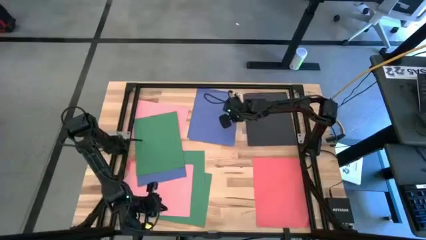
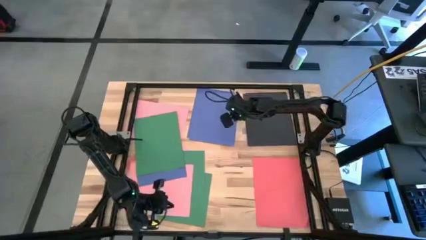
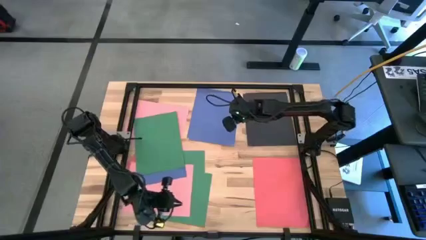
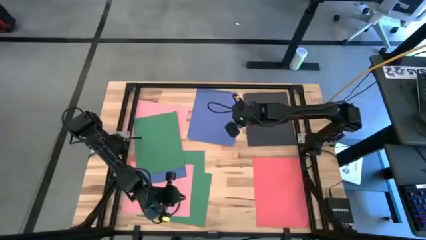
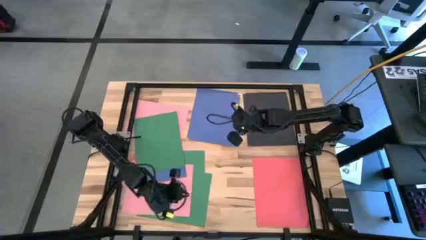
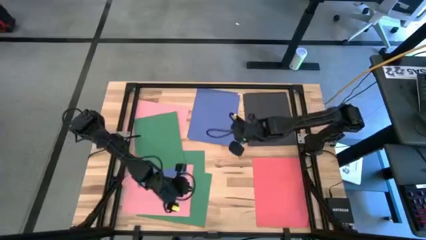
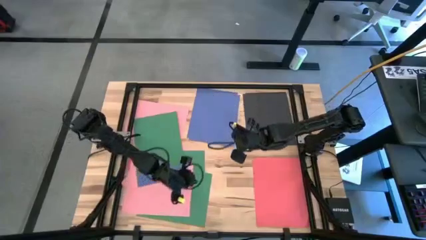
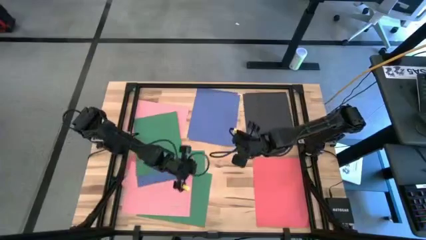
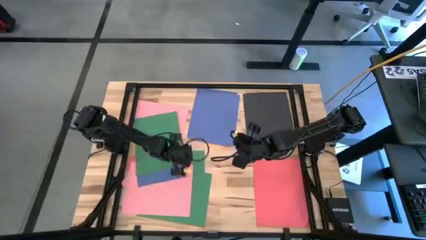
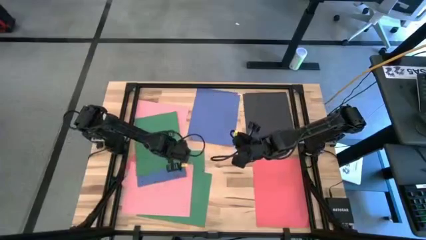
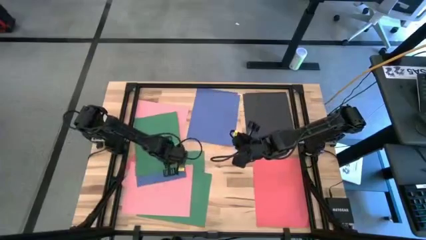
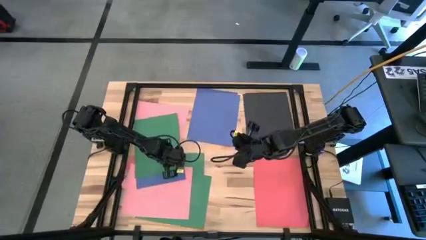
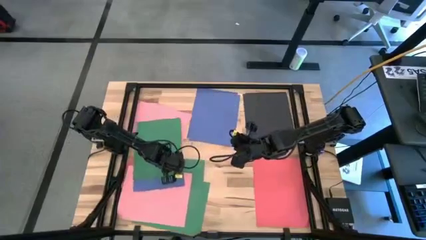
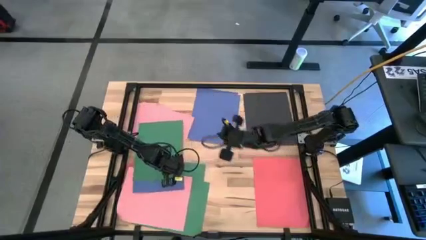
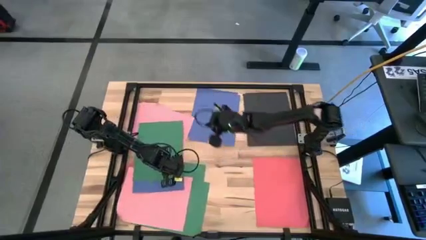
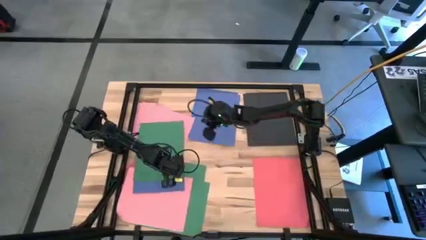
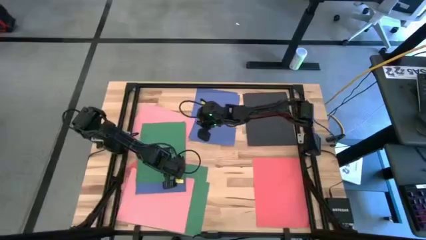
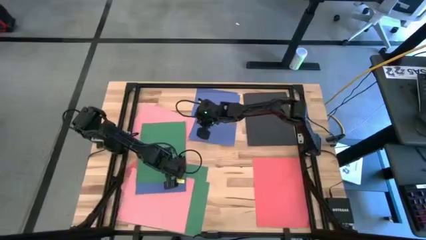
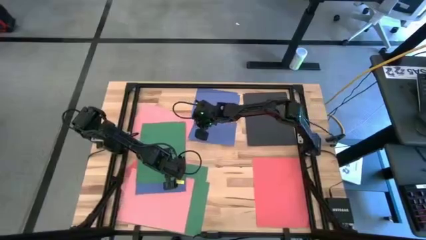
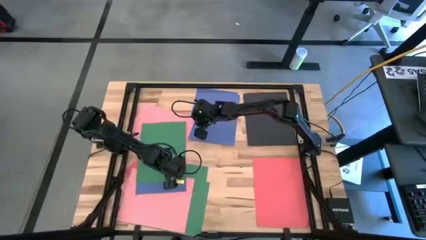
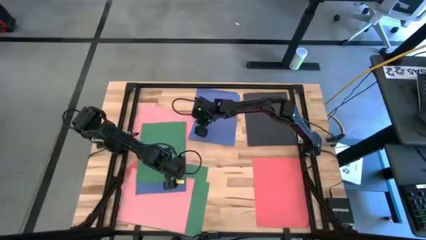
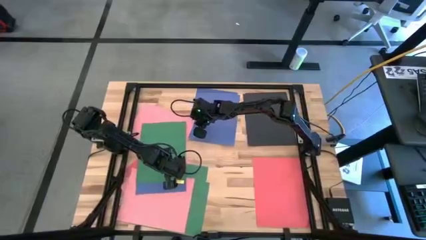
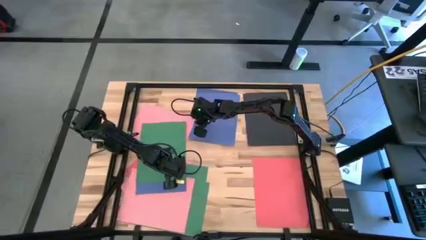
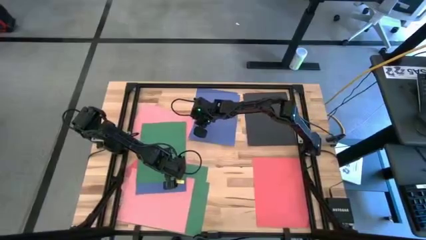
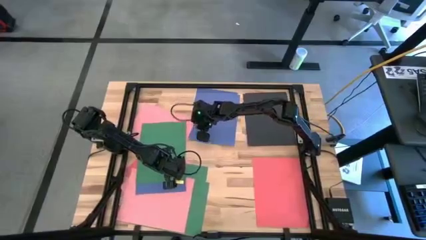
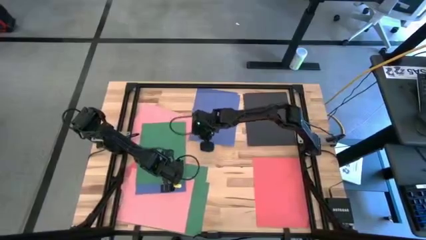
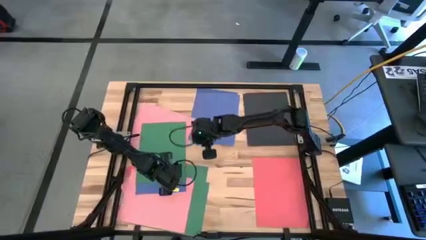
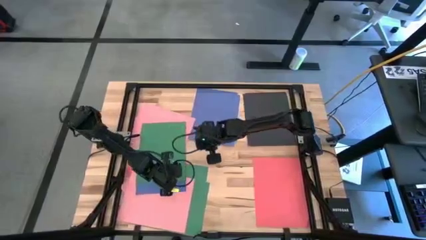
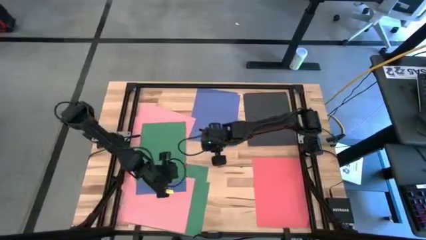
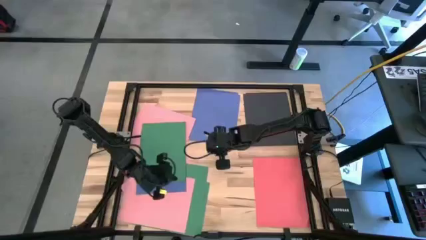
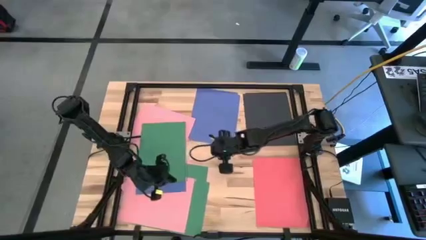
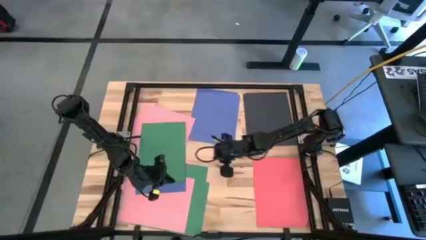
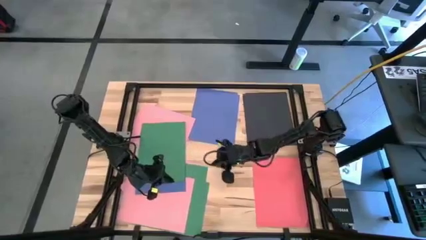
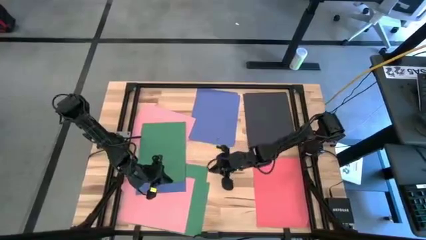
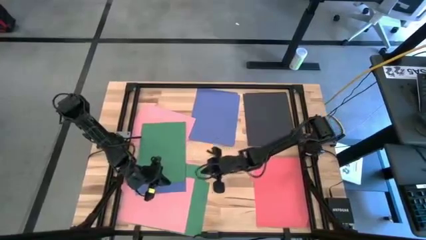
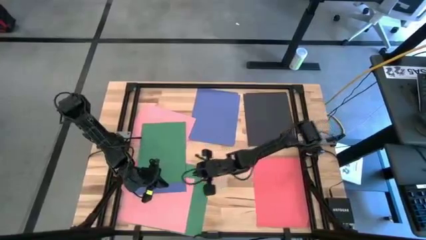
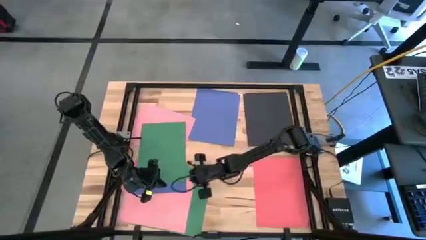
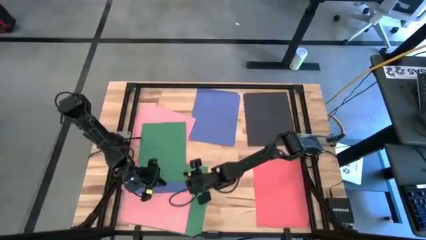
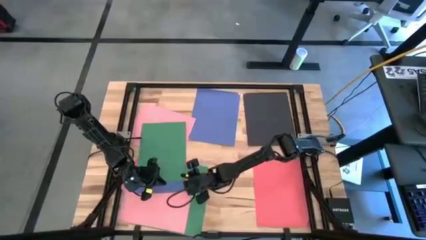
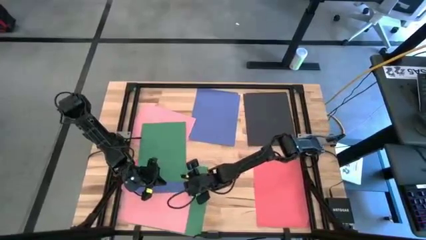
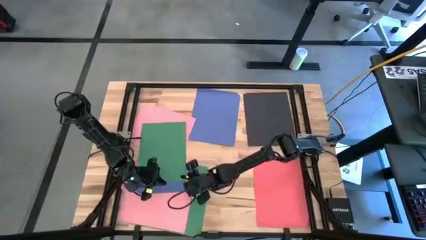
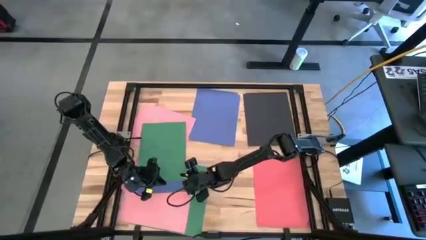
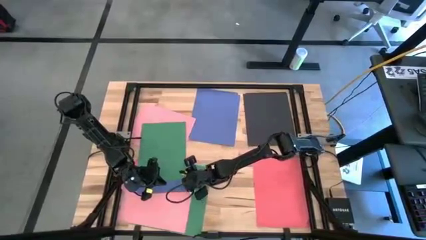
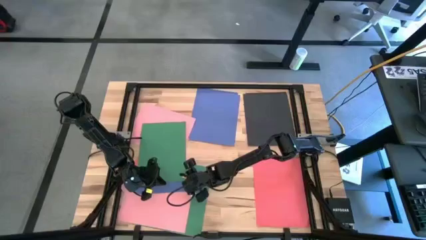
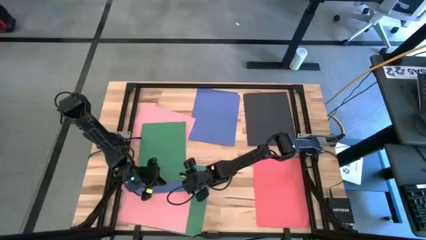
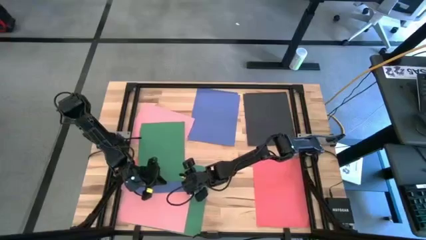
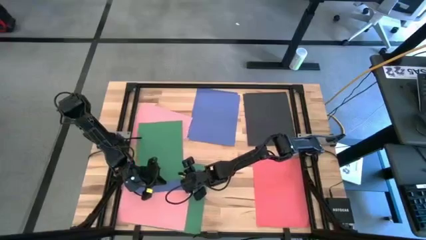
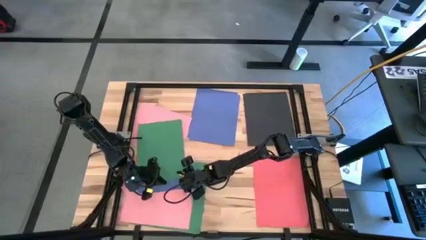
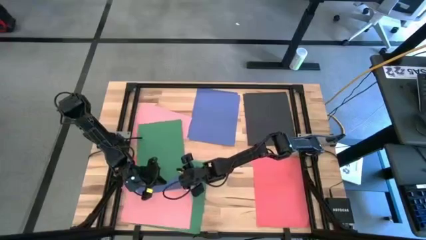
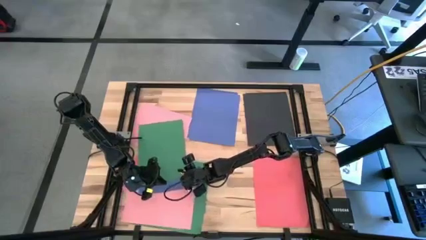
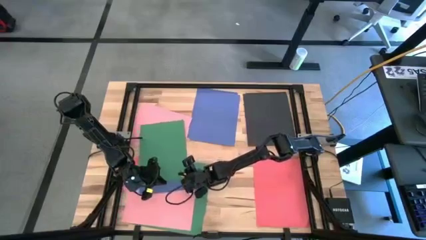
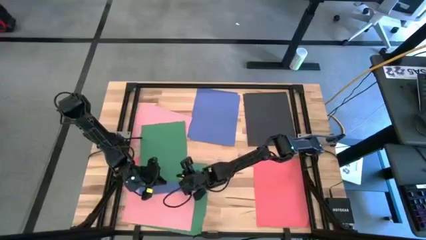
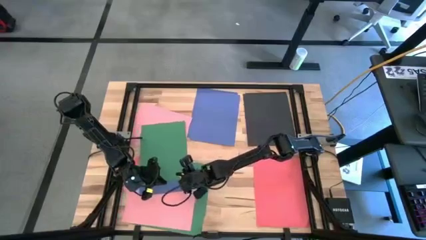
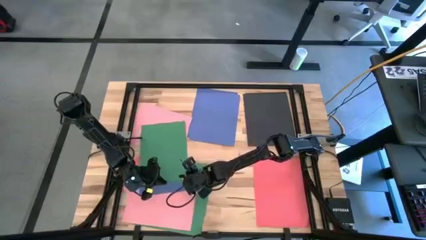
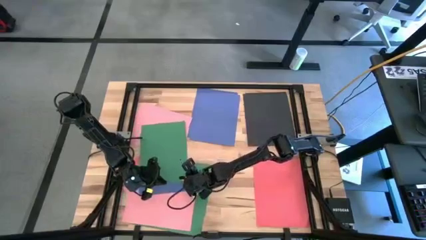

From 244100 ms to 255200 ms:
Task: Organize paper
Stack the blue paper on top of the other blue papers on the table

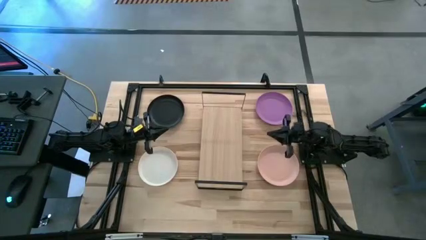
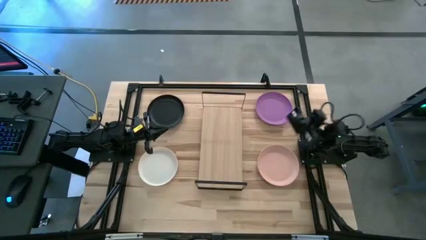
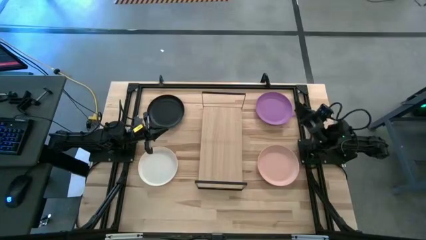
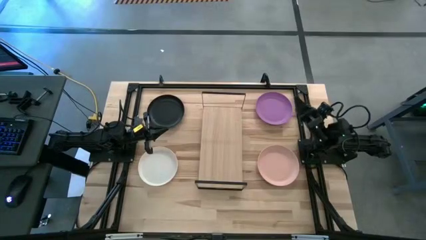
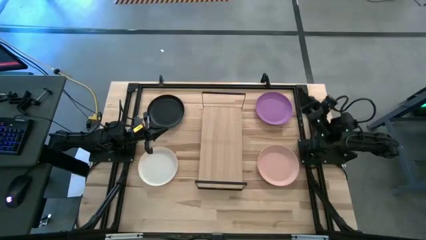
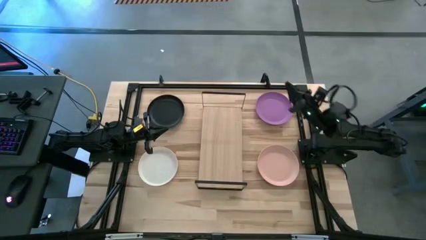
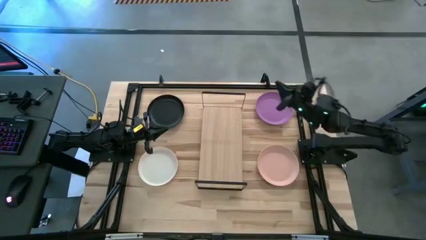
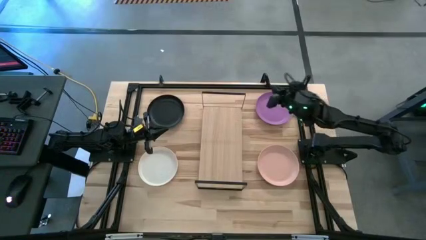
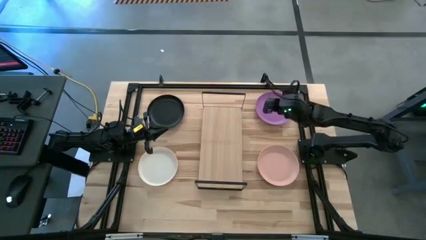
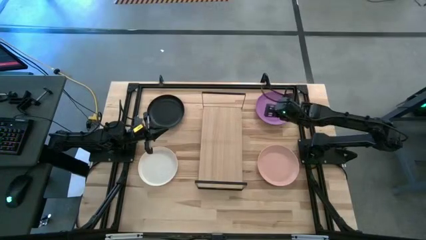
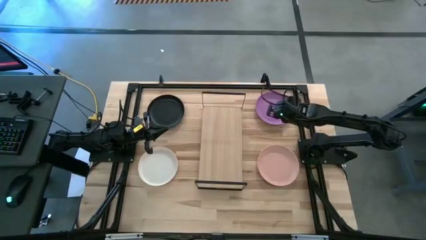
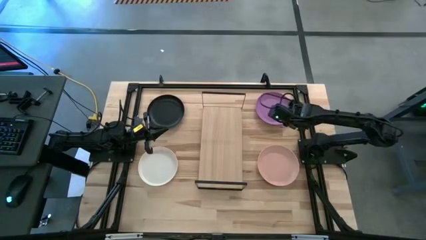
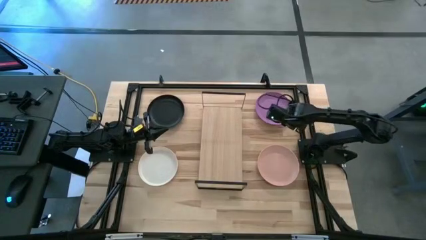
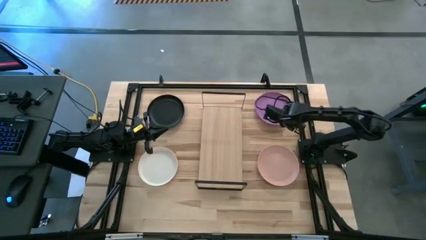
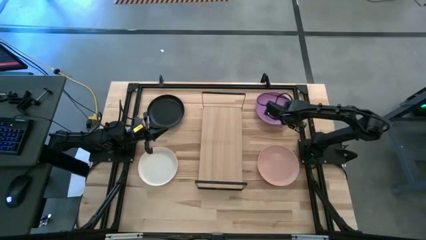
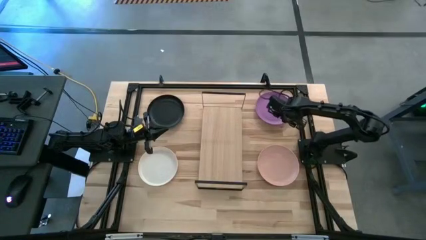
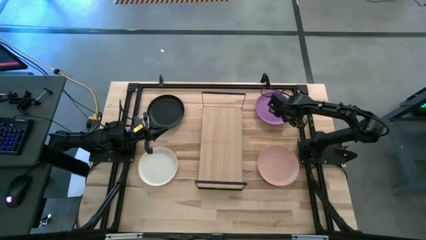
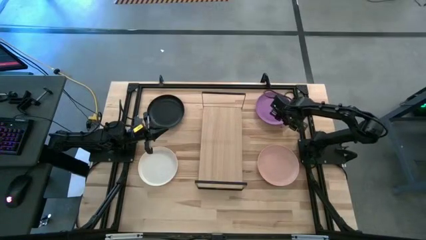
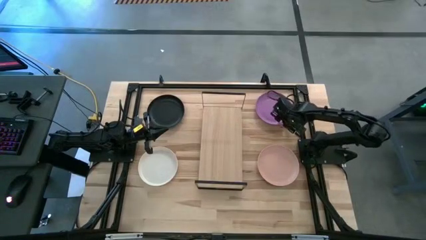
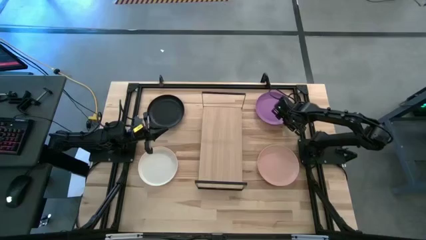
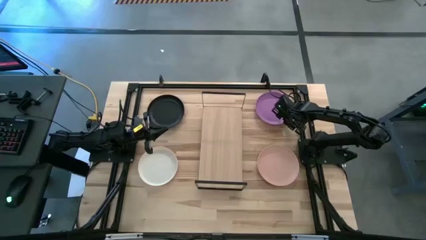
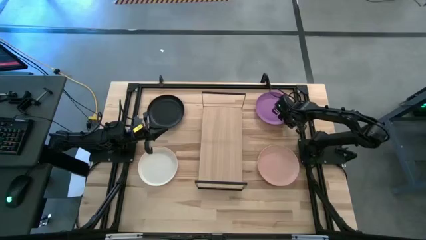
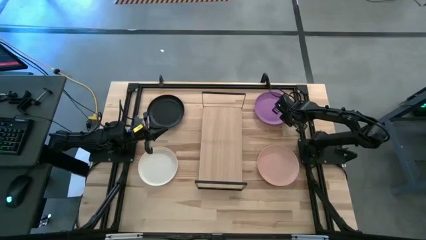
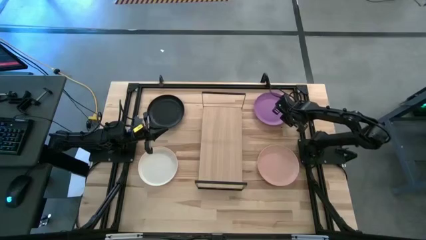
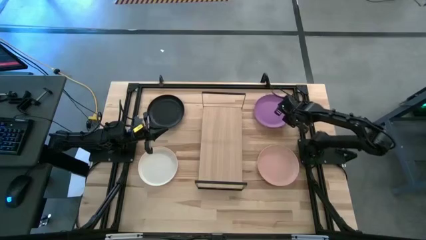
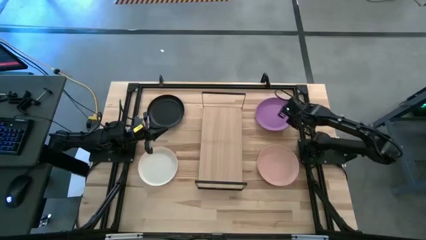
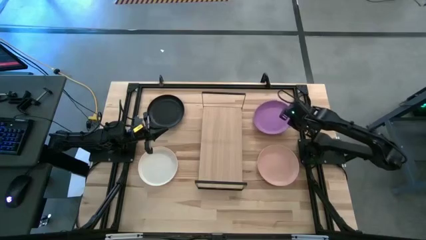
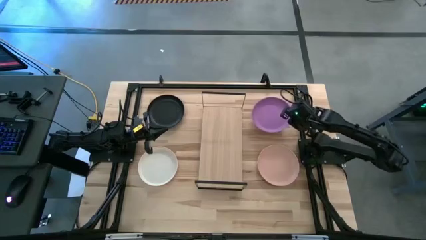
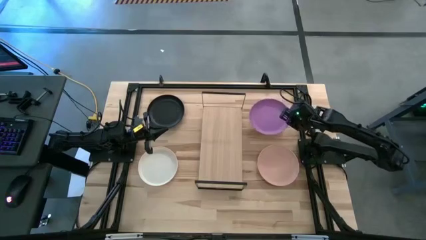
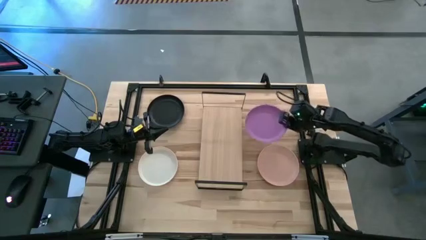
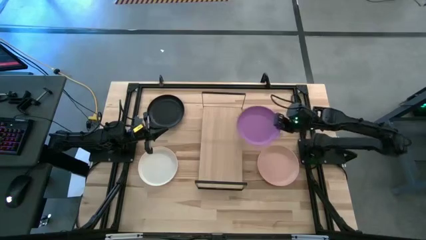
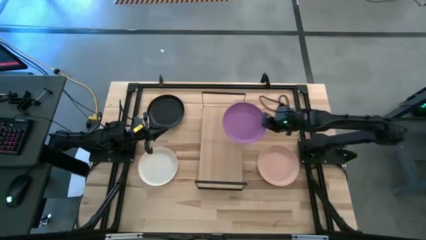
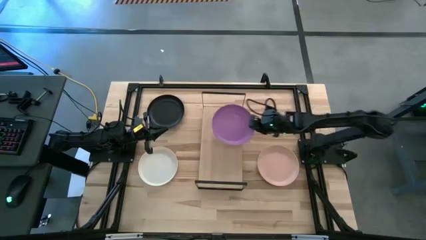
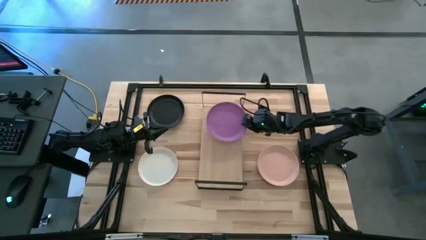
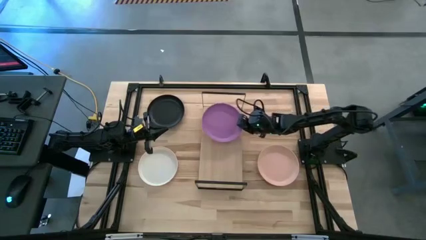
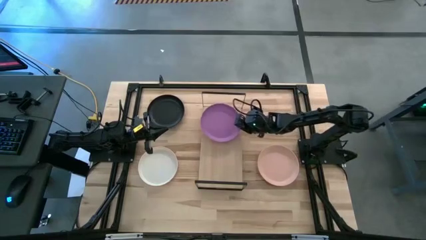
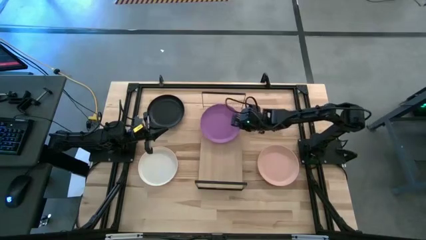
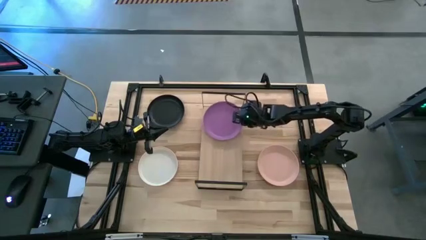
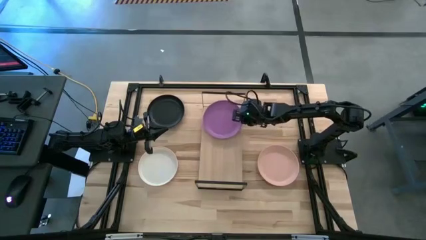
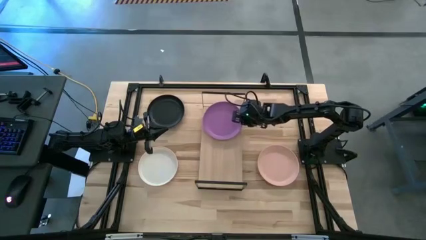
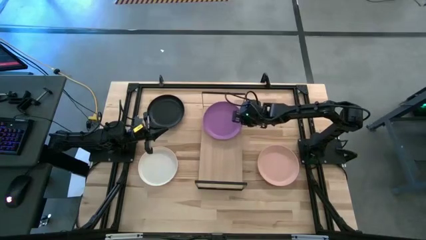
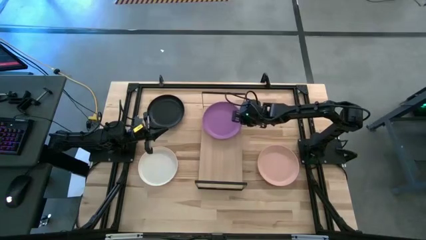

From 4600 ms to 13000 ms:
Task: Place and stack plates onto a shelf
Put the violet plate on the shelf
